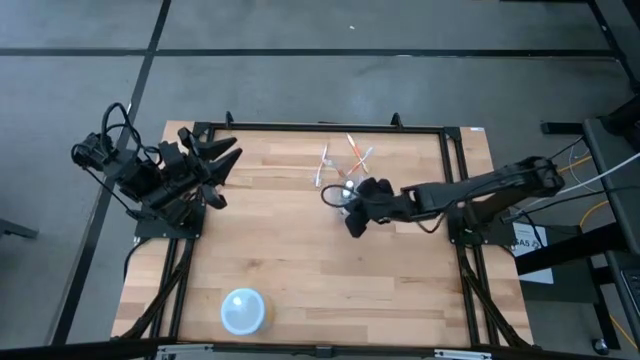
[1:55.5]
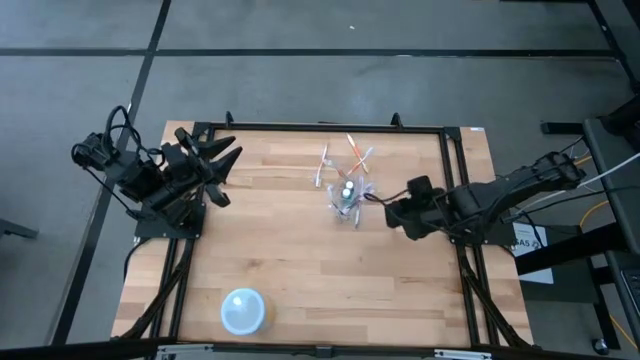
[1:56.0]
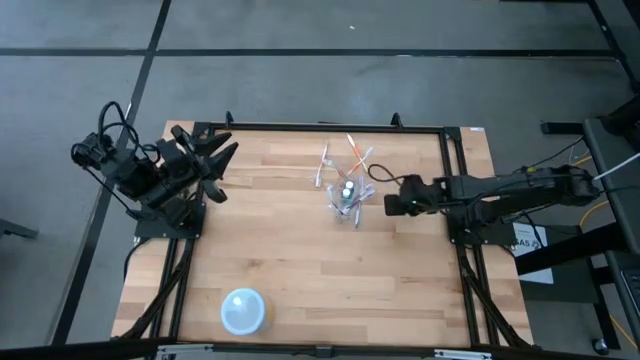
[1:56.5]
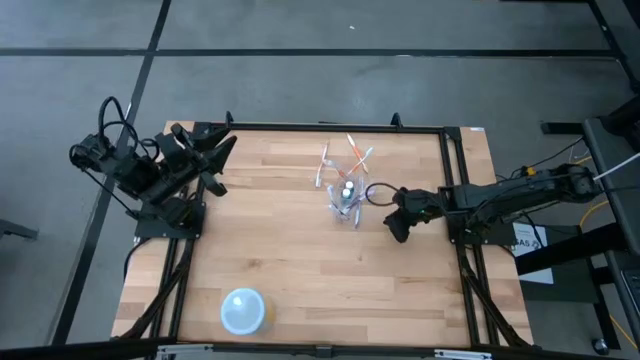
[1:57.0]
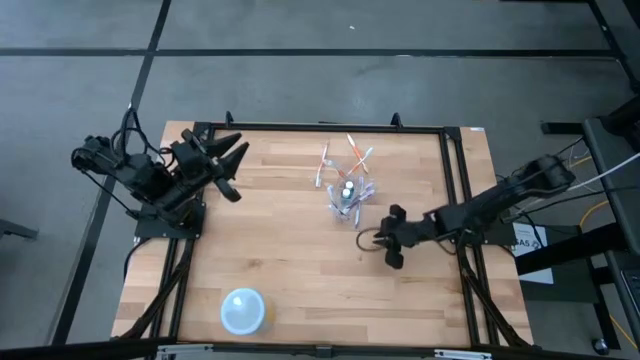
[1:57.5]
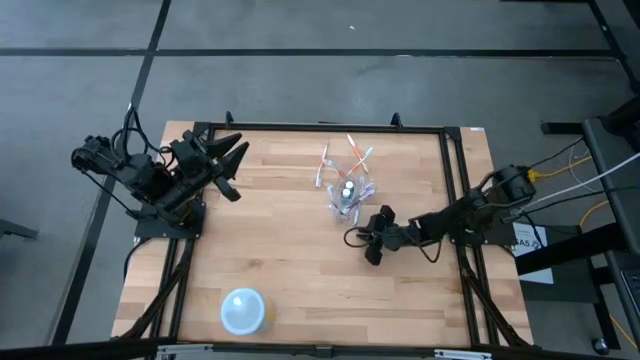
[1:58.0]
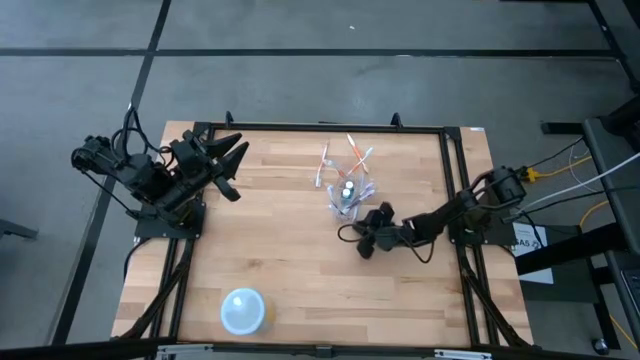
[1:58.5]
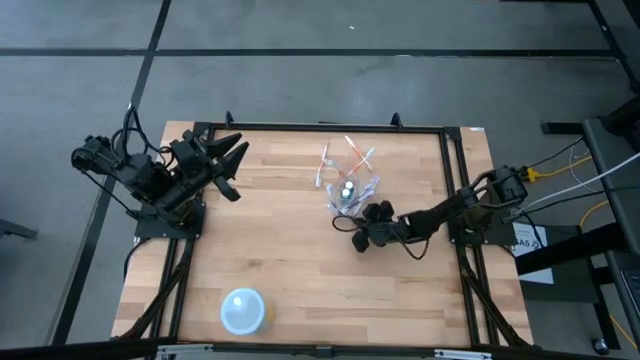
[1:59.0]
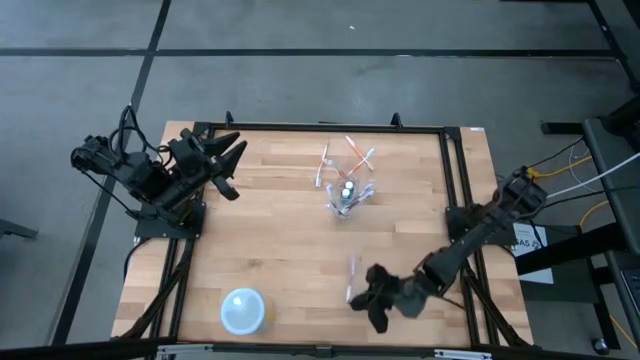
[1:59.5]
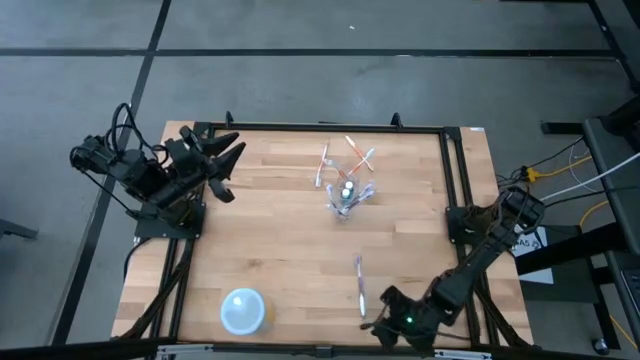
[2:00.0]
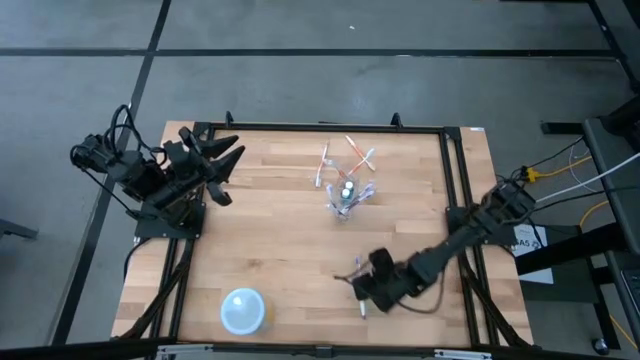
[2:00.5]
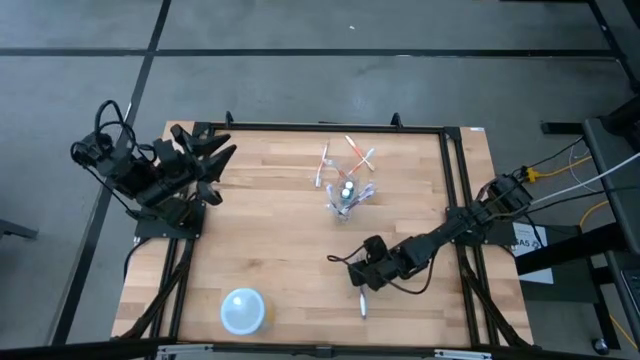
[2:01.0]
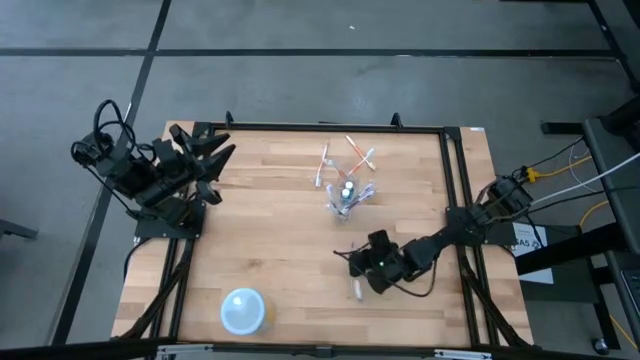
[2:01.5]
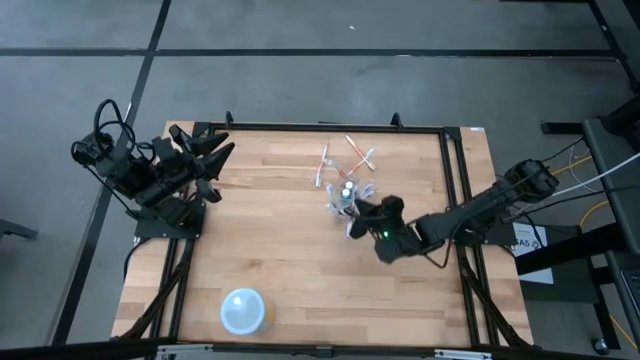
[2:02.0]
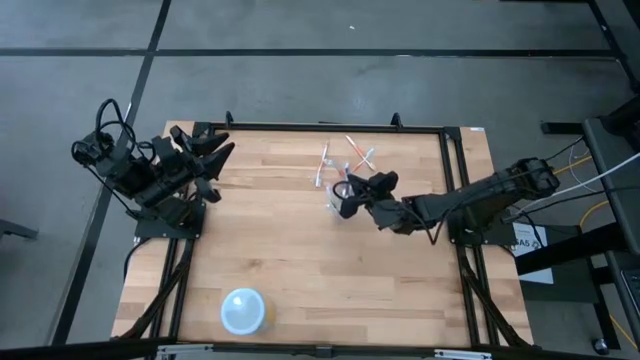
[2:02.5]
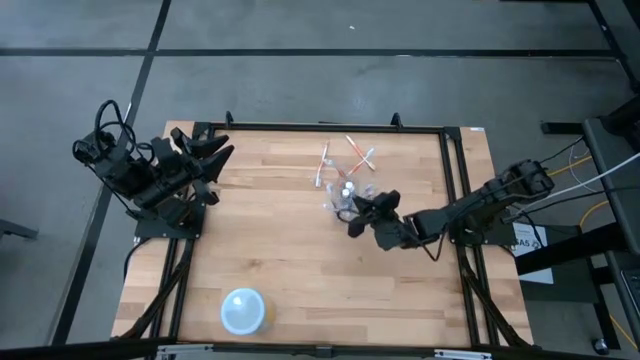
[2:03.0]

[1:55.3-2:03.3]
Task: Pick & Place toothbrushing station
Put the purple toothbrush into the transparent organizer

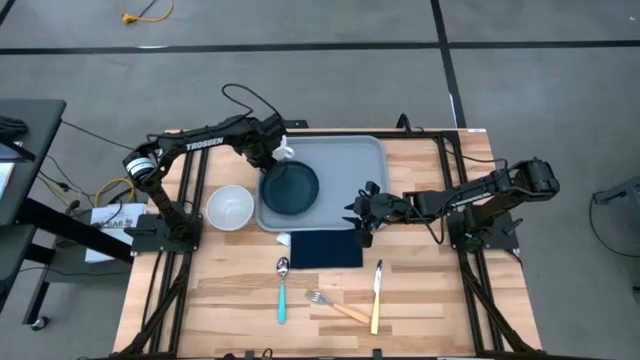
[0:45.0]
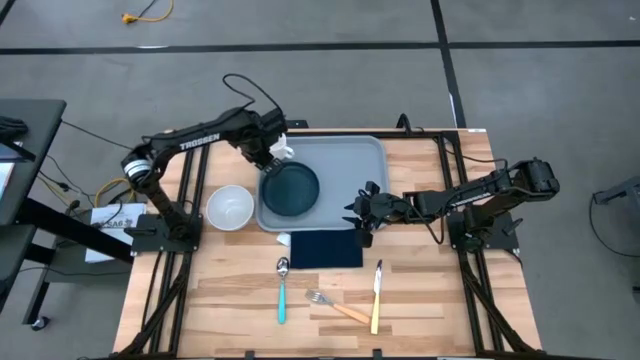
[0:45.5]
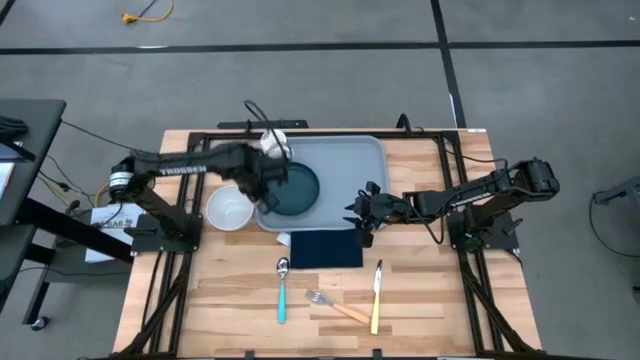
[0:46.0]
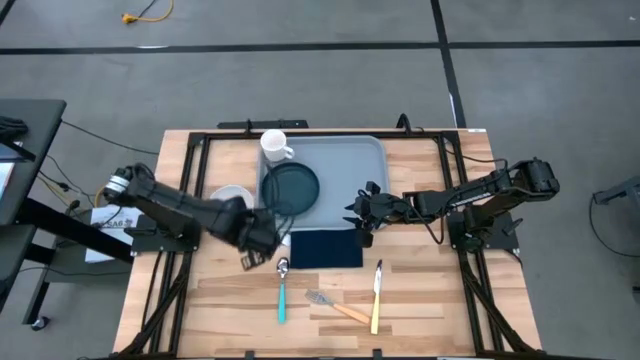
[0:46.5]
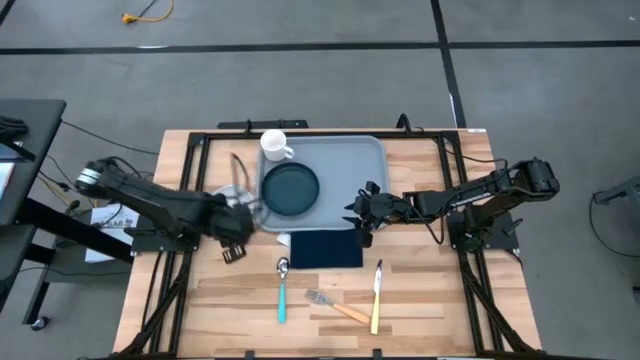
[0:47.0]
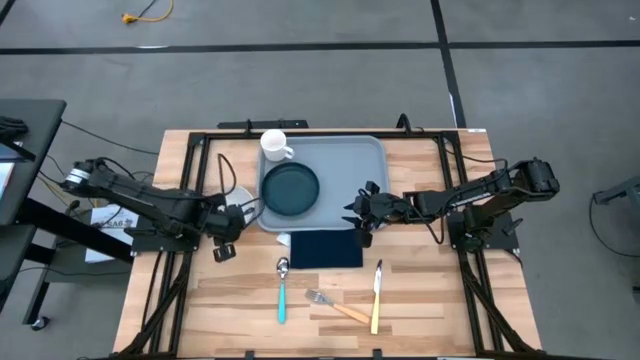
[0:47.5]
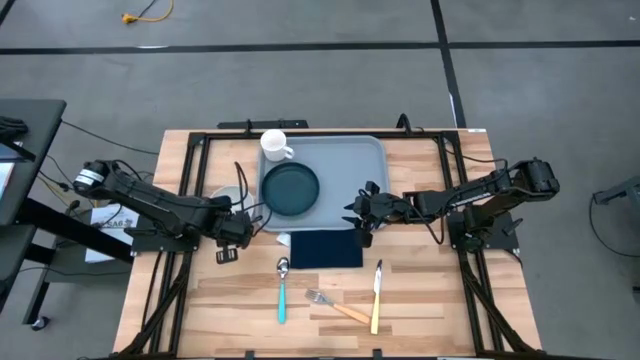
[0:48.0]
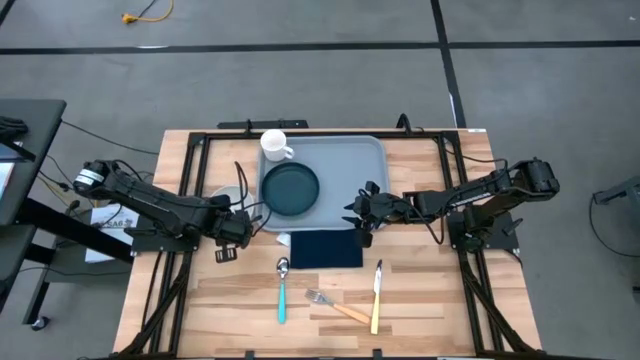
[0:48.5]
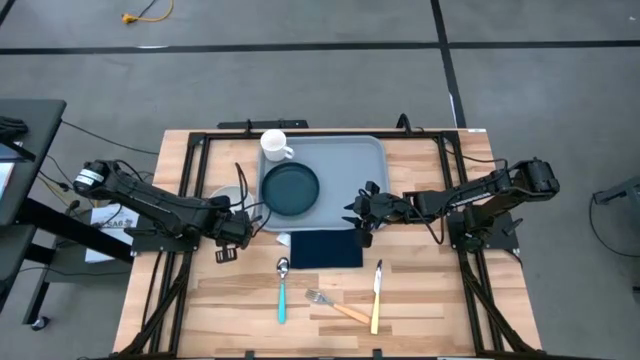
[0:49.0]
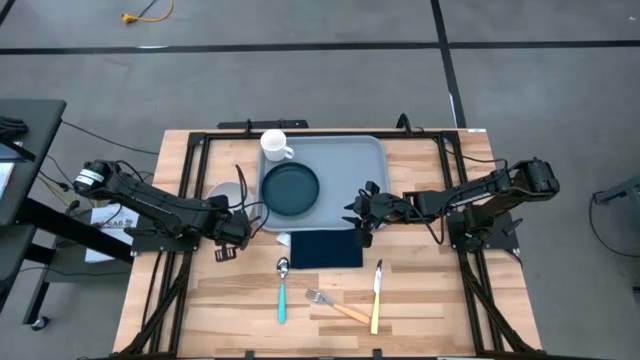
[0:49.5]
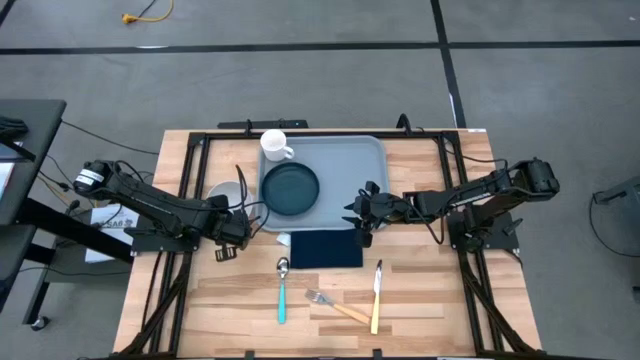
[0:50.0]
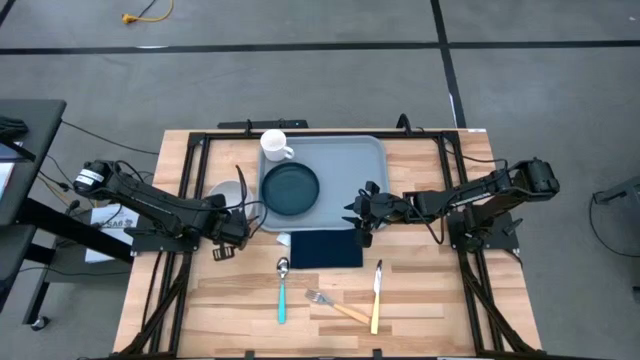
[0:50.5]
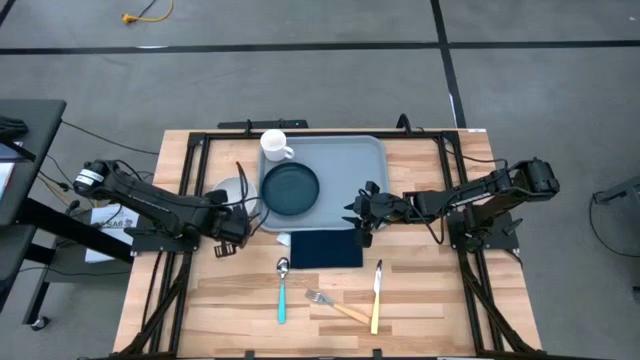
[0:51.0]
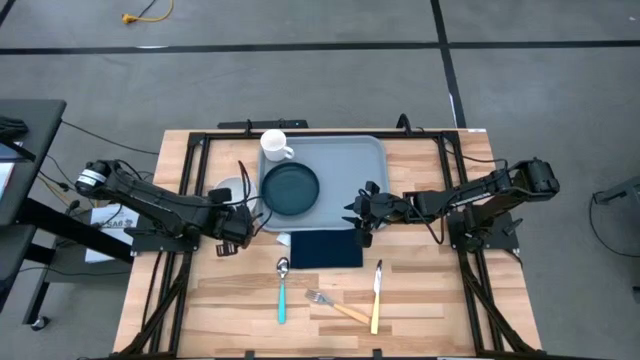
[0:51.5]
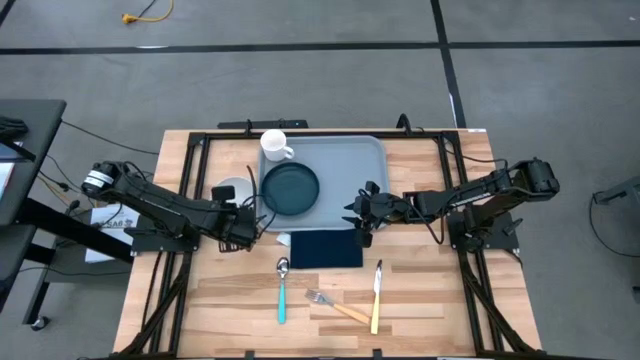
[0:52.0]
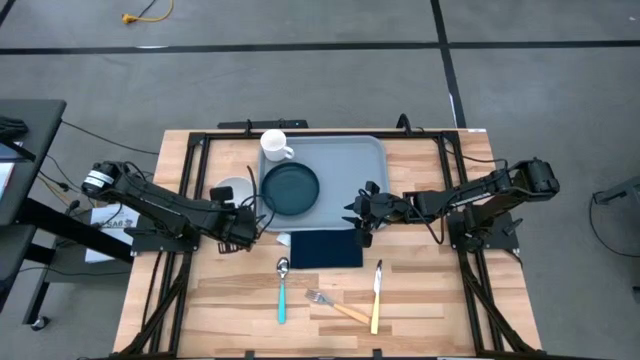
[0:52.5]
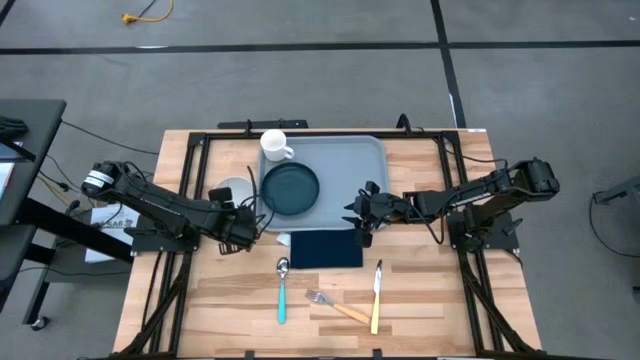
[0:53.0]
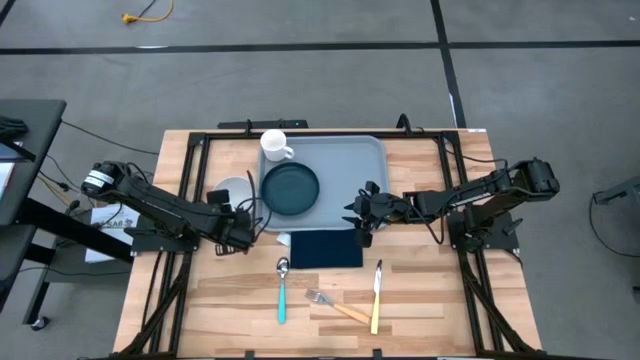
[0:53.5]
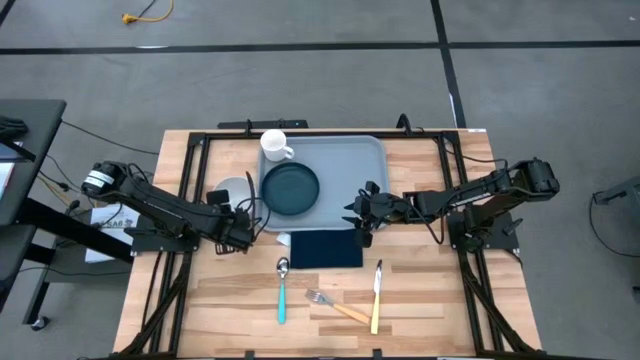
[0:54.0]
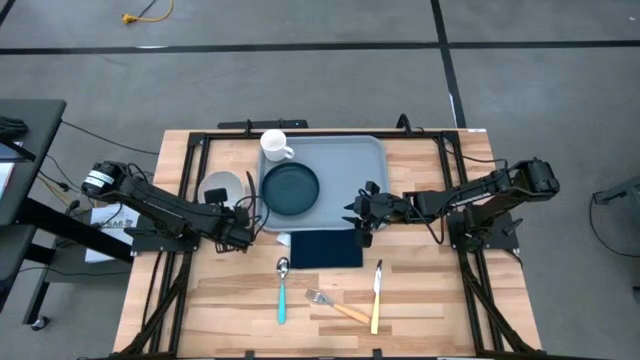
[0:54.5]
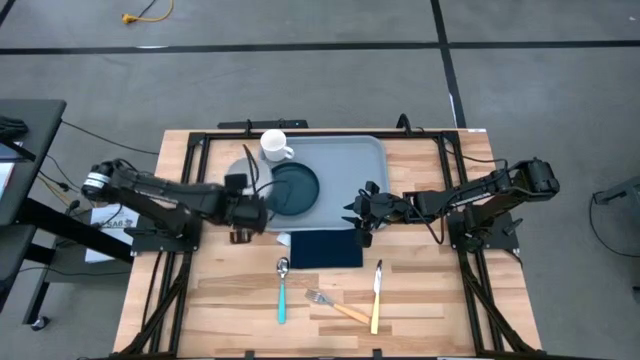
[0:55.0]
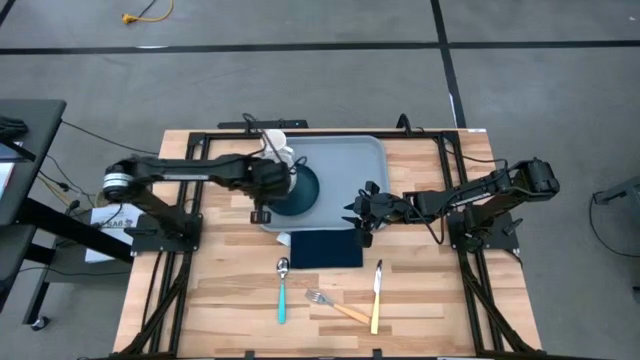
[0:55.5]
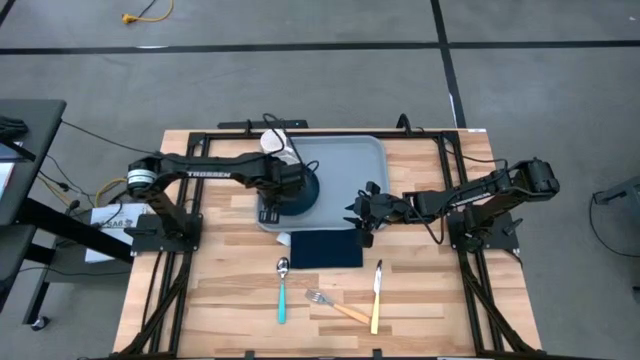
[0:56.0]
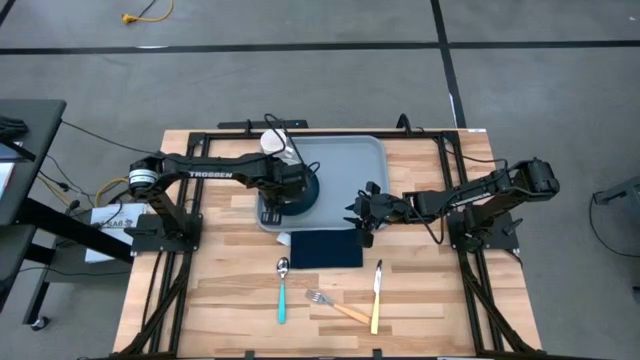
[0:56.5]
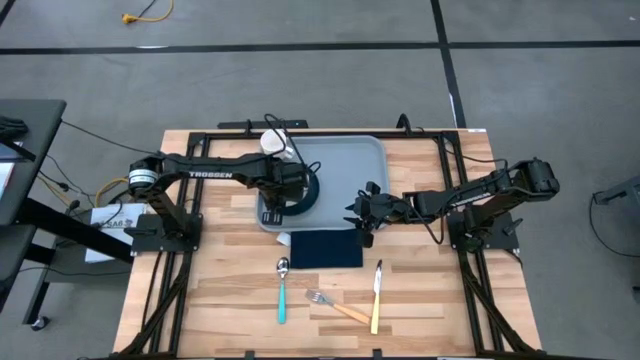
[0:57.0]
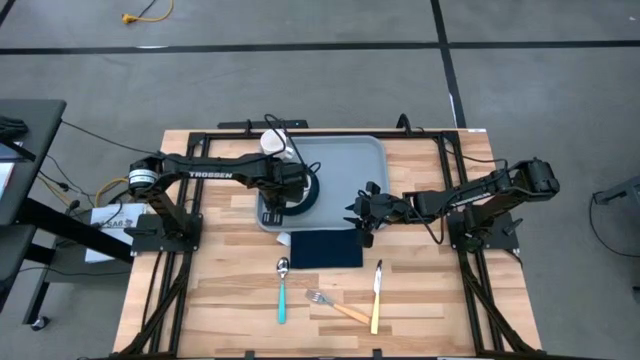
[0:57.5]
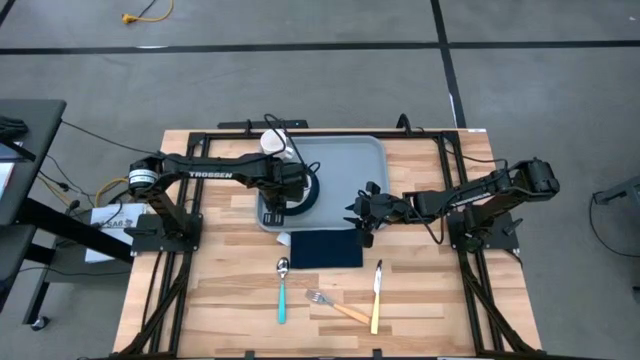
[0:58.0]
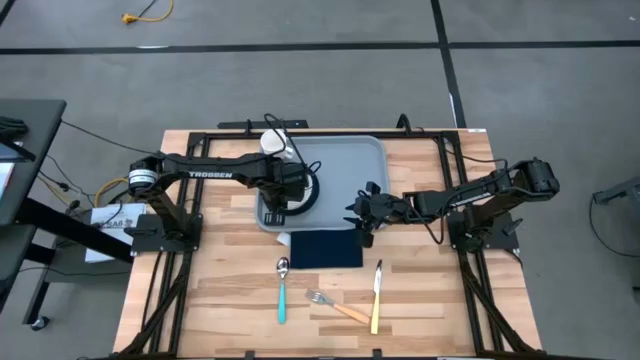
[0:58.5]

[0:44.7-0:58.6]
Task: Set up tray
Put the white bowl on the black plate
